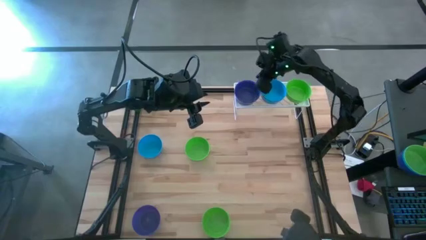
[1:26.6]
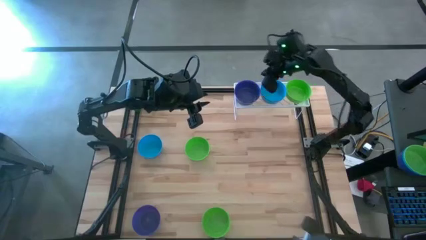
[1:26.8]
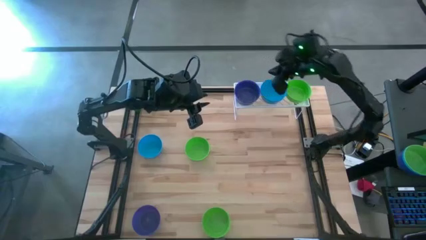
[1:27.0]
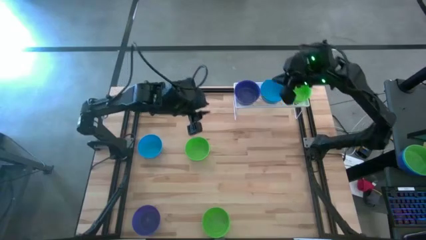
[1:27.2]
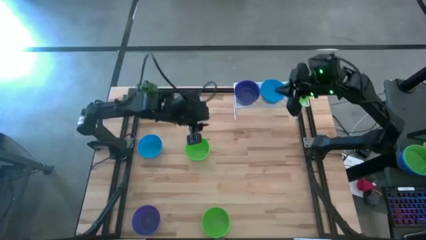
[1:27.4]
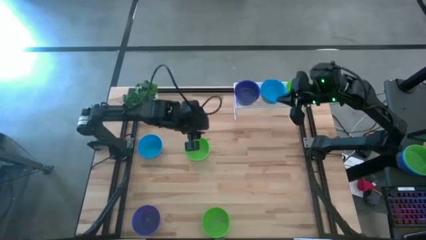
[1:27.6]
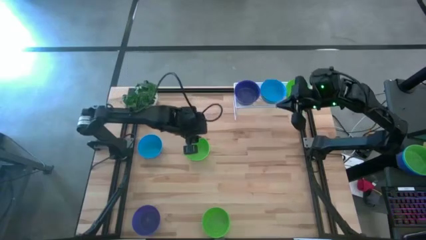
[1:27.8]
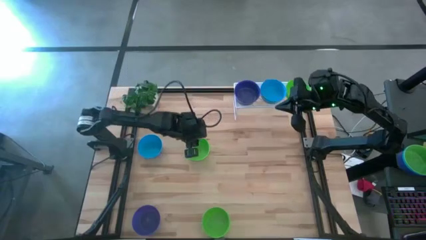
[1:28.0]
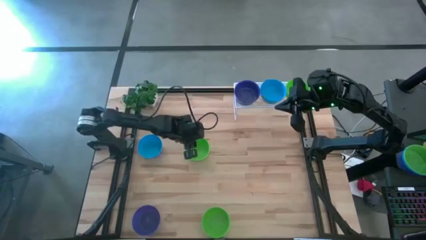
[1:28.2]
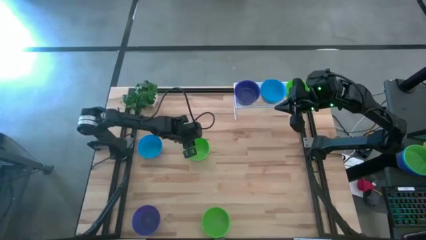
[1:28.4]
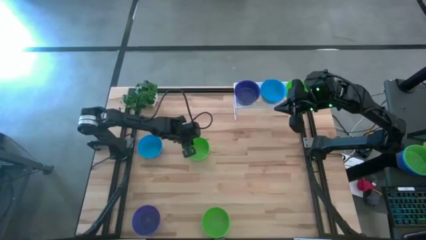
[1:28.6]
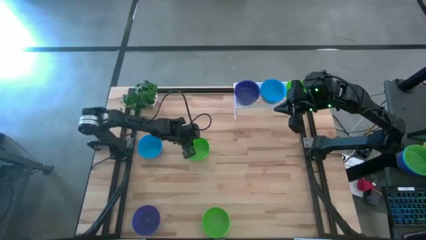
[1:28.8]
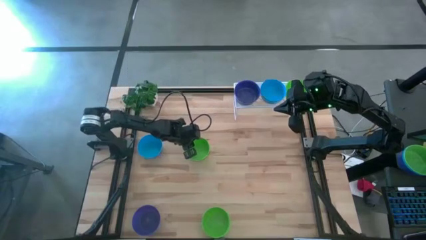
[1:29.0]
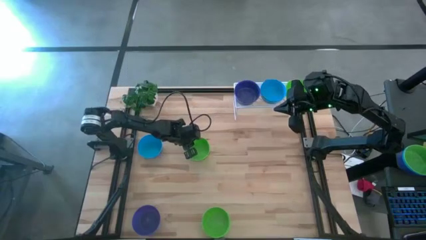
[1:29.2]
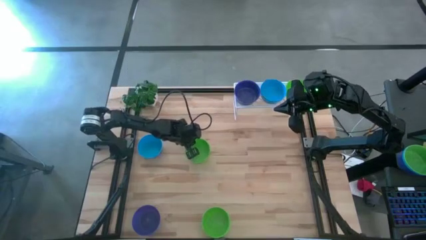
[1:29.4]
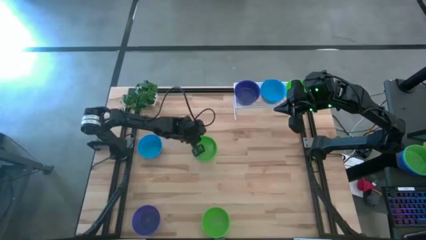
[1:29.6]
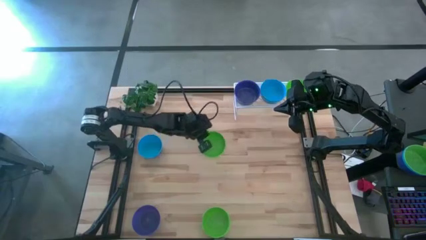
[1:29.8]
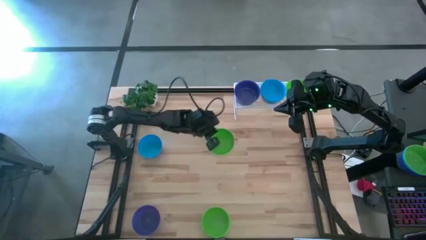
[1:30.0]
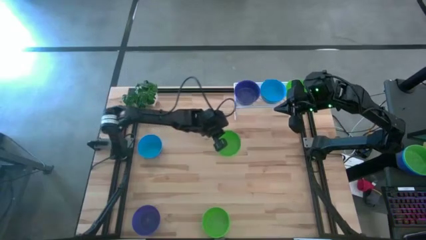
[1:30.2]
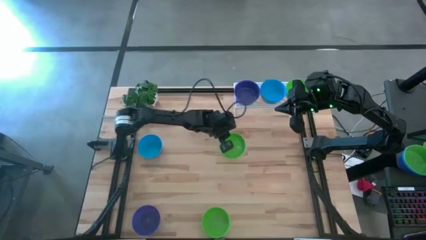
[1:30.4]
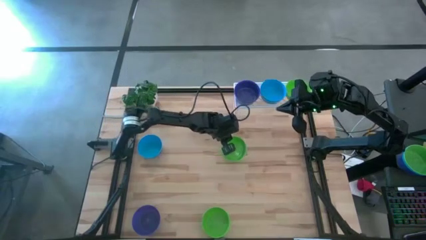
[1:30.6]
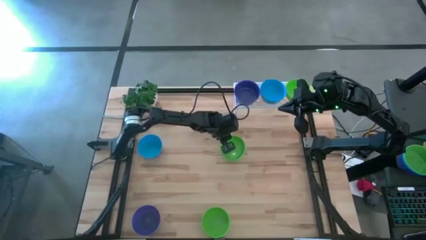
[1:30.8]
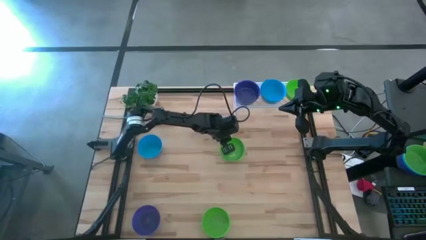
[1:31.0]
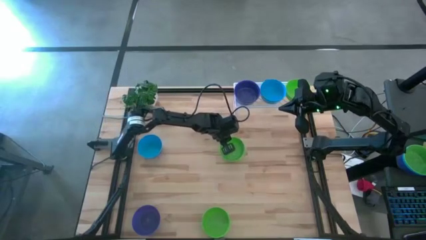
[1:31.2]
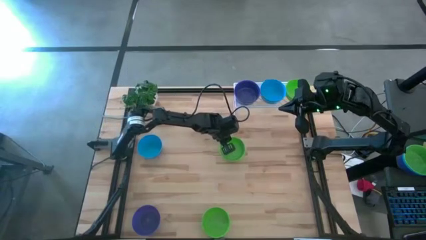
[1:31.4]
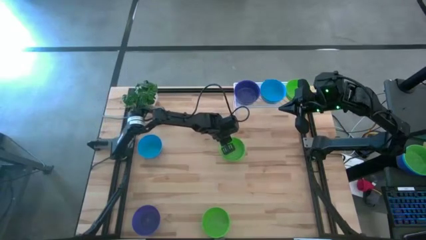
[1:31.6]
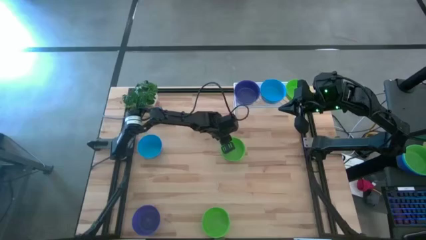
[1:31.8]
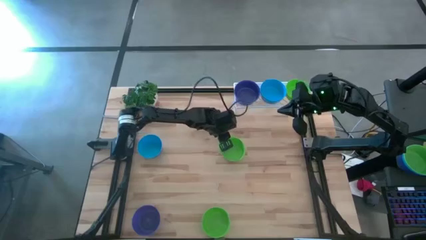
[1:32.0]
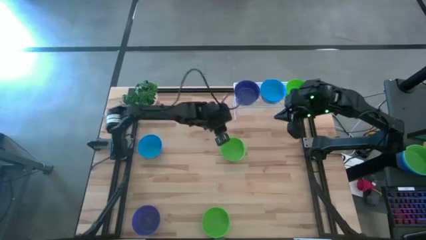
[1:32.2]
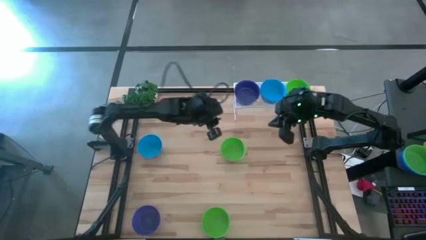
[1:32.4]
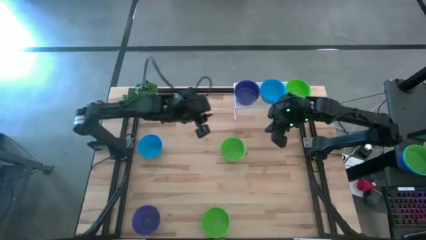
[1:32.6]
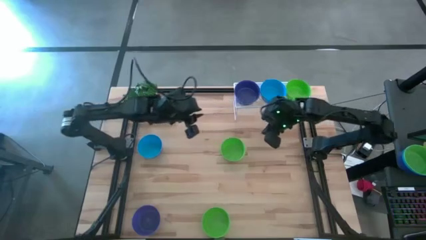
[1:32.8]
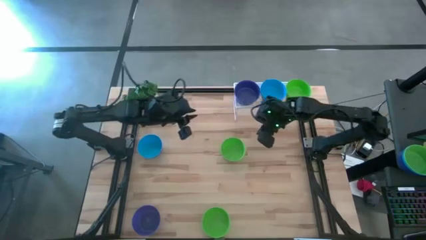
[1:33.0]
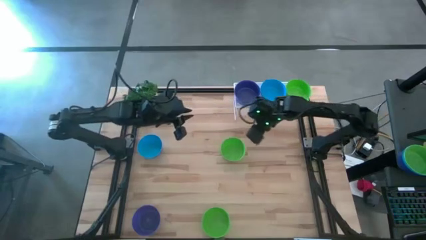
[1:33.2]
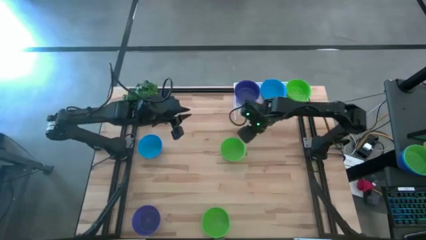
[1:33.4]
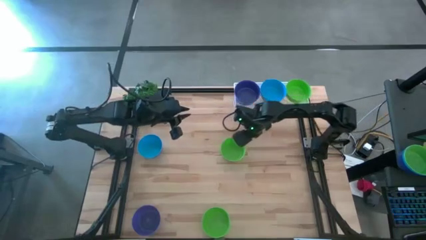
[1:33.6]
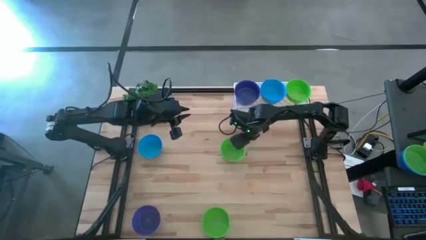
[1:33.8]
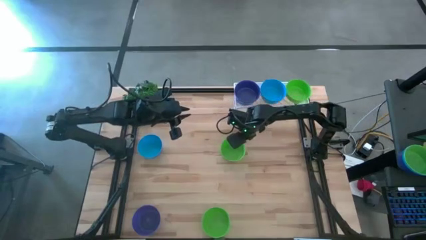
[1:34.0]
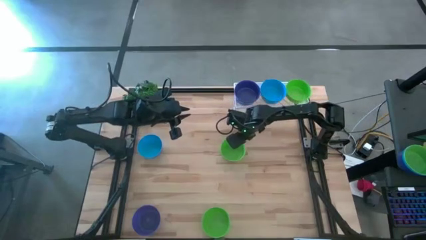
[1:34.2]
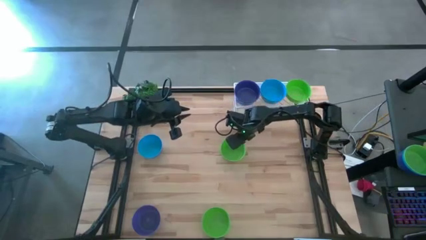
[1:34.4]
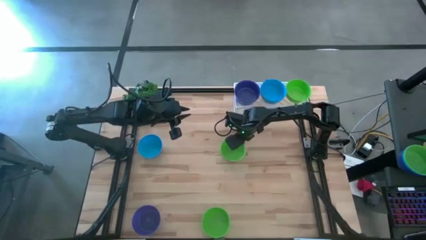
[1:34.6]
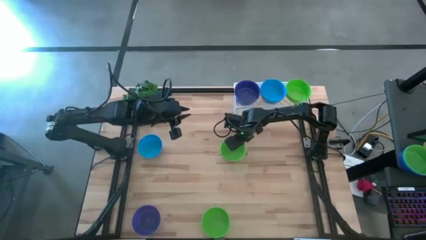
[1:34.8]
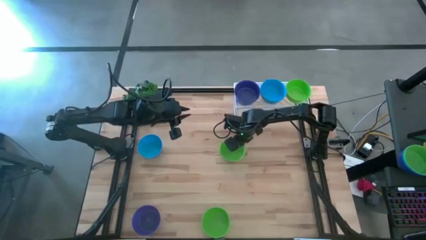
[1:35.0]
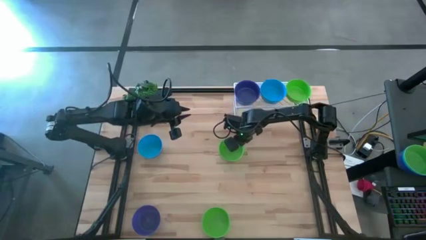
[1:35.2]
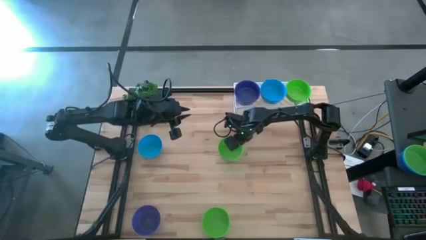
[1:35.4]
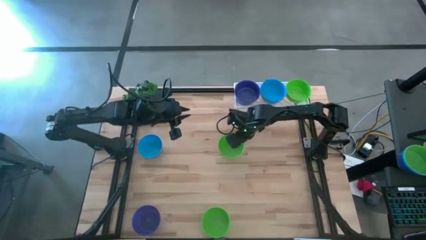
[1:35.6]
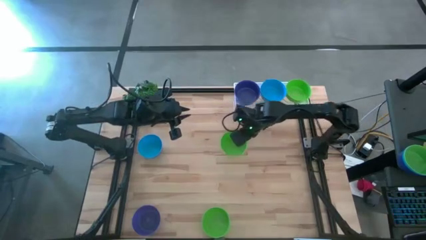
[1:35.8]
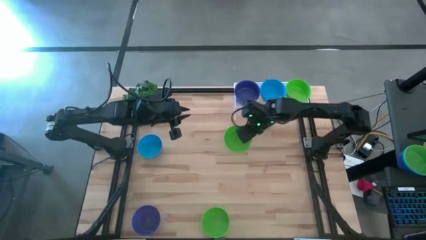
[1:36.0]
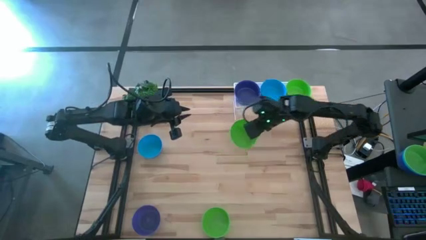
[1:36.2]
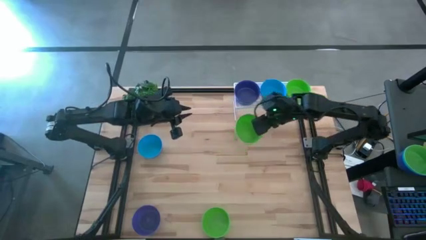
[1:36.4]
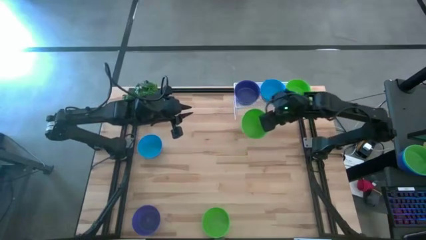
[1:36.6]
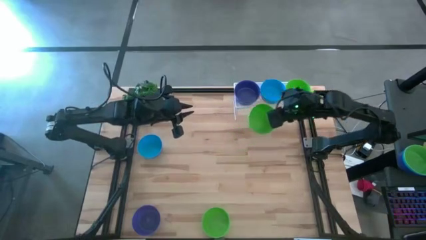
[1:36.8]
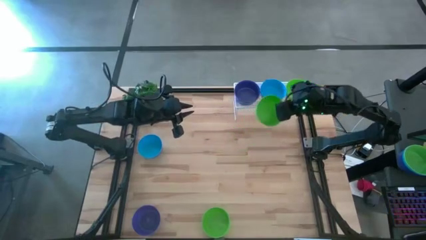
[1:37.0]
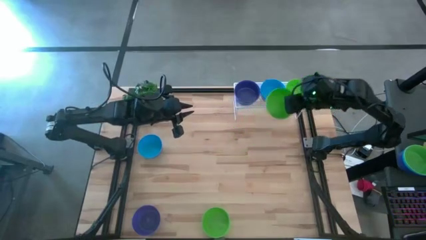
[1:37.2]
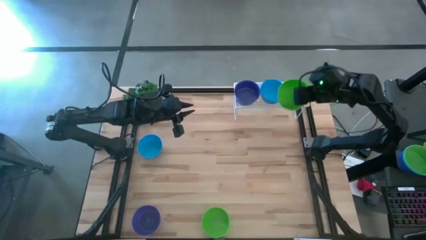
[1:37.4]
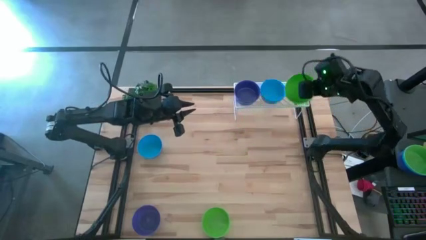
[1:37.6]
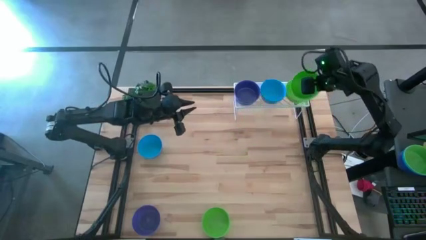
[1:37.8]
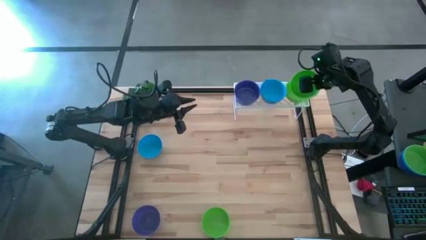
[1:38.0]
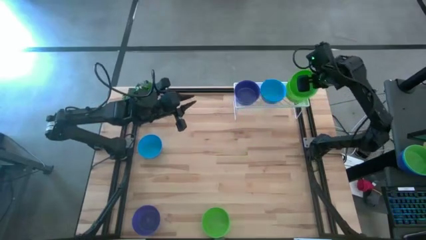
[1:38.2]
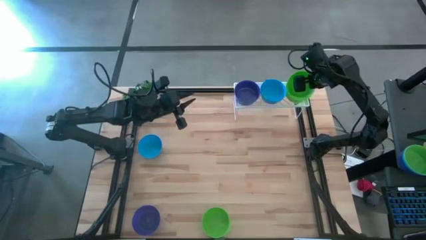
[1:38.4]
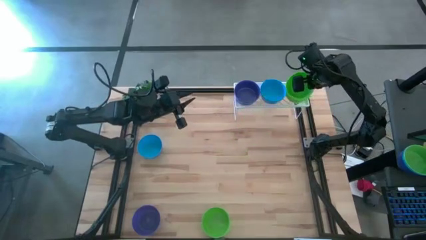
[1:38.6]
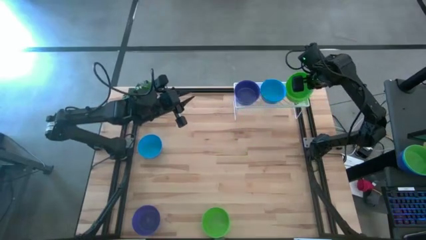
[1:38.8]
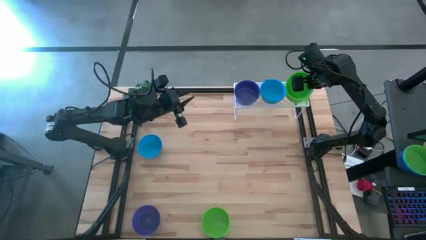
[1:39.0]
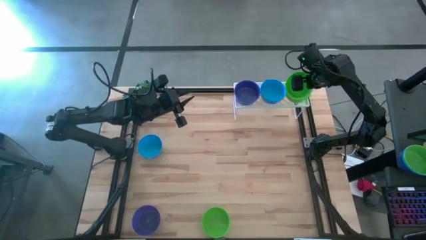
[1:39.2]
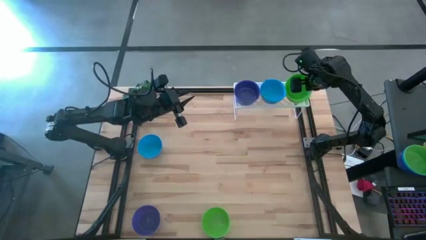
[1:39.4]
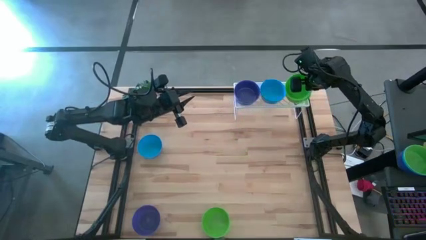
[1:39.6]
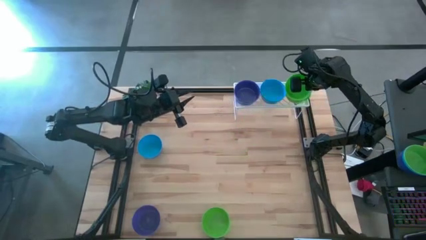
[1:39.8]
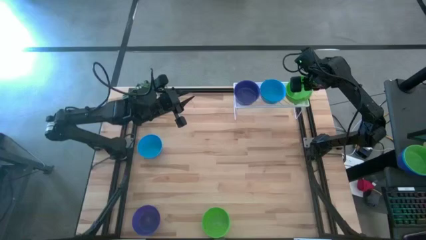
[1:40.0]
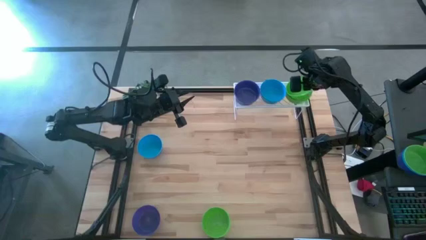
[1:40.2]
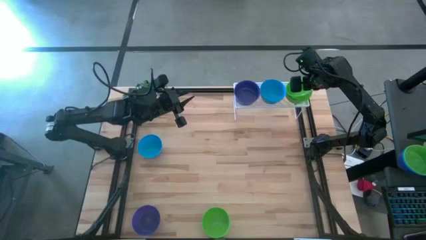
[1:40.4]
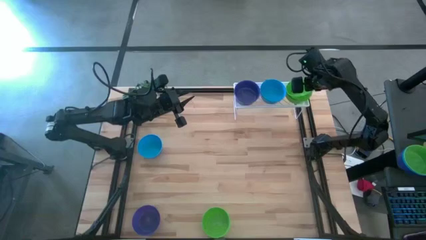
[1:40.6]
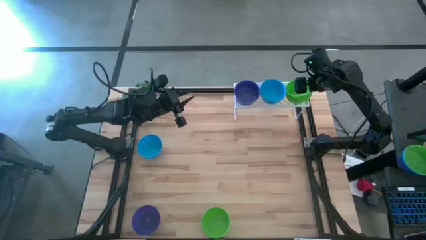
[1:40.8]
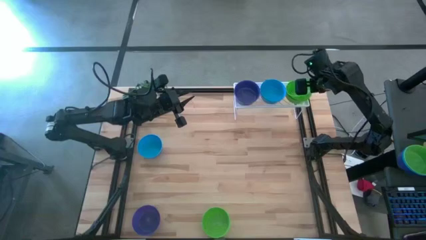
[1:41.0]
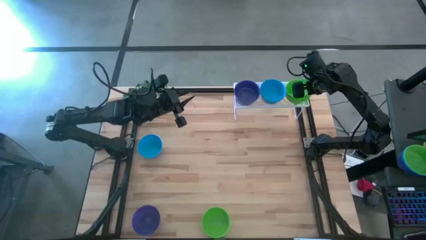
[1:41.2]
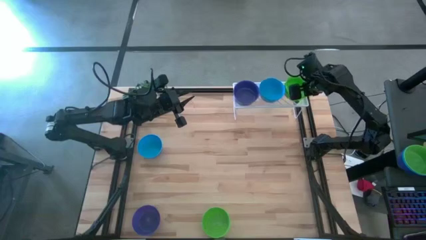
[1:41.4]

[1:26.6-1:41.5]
Task: Pick & Place Mini bowls
Stack the top green bowl on top of the green bowl on the shelf
